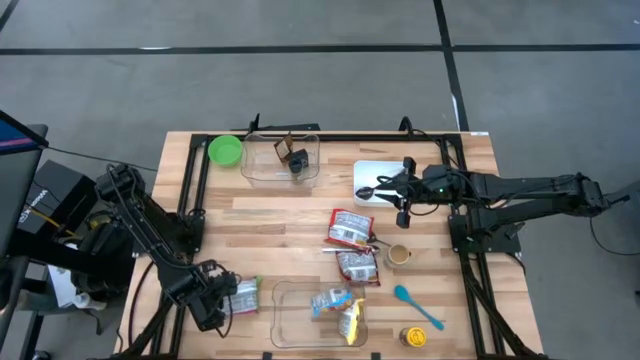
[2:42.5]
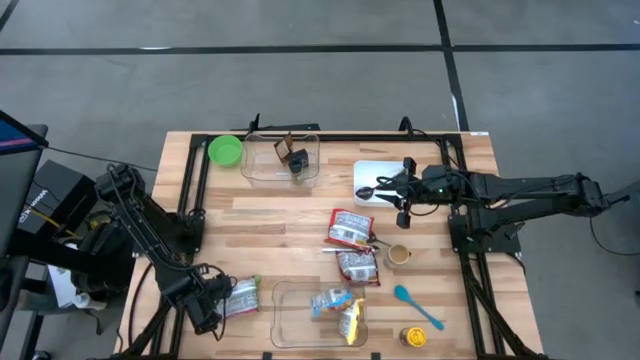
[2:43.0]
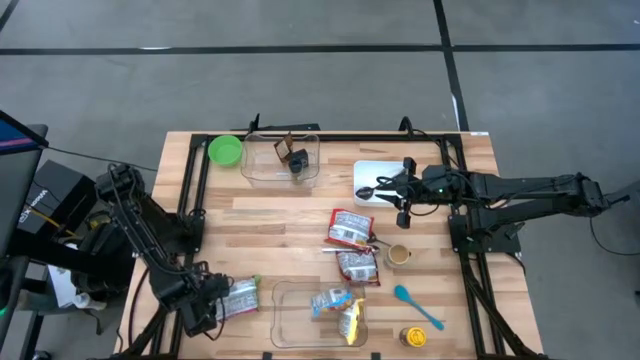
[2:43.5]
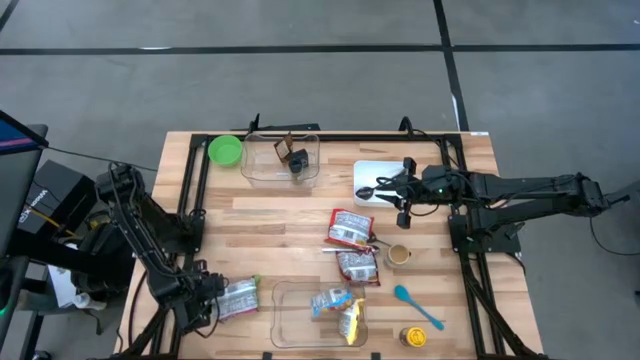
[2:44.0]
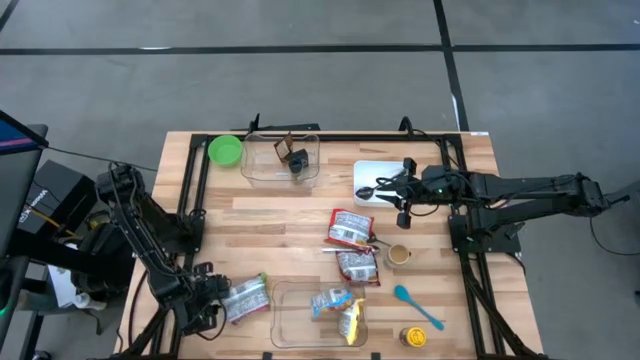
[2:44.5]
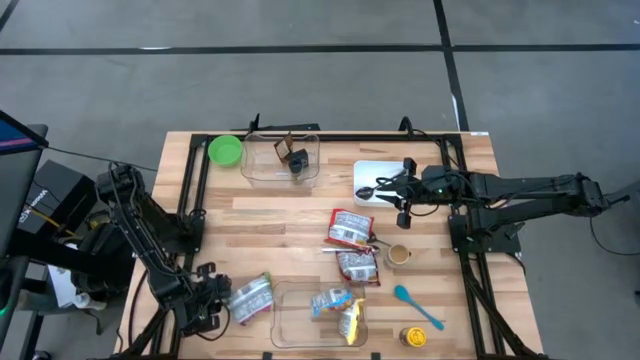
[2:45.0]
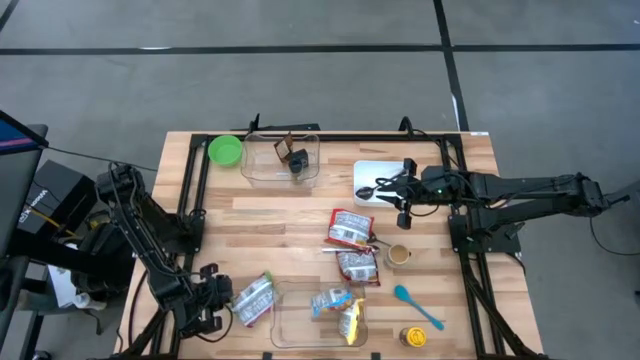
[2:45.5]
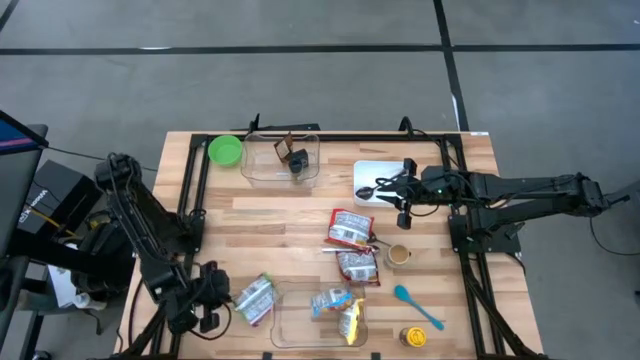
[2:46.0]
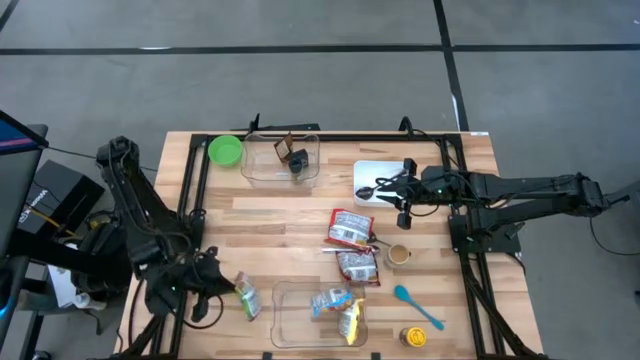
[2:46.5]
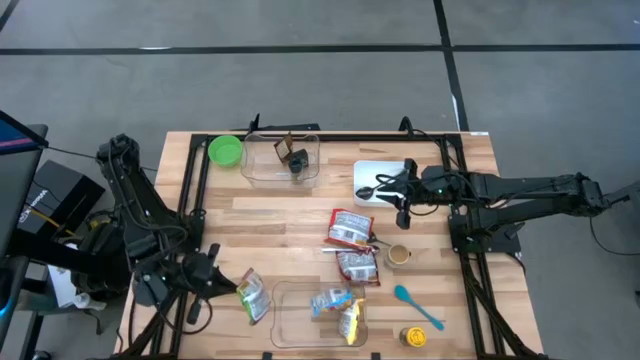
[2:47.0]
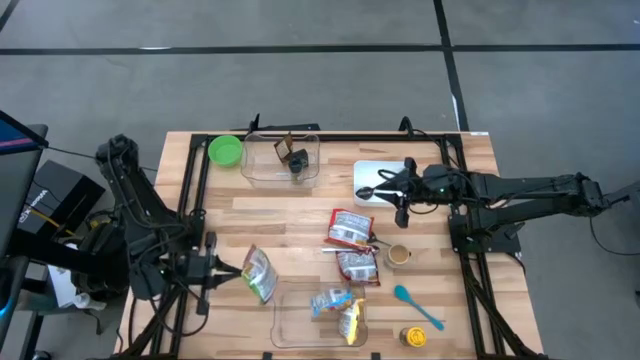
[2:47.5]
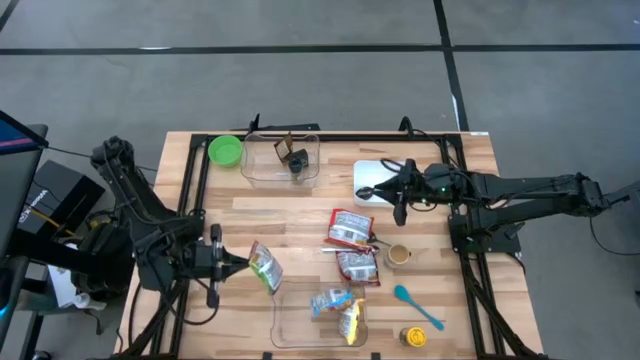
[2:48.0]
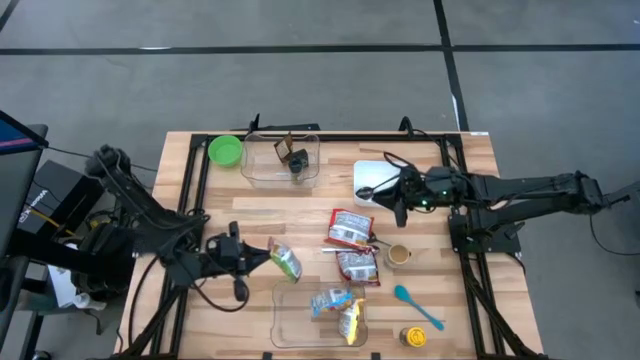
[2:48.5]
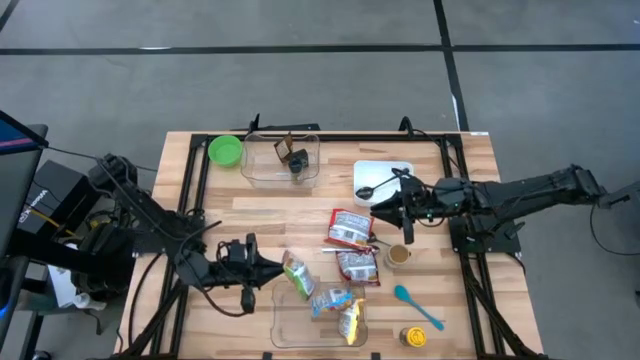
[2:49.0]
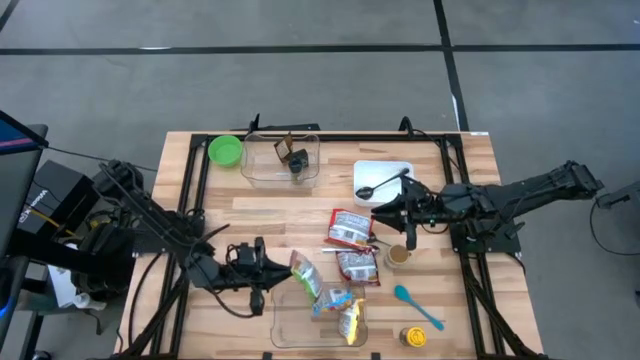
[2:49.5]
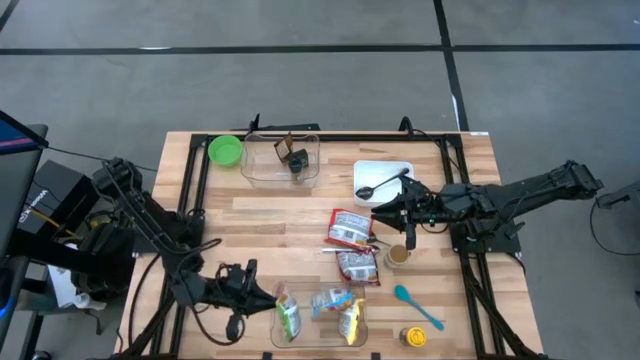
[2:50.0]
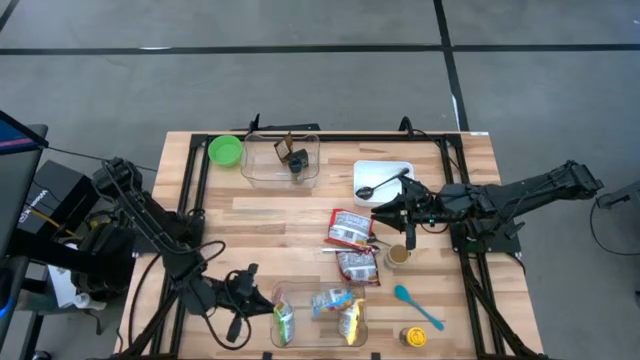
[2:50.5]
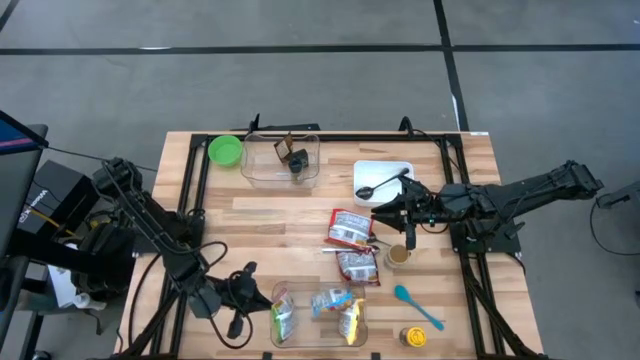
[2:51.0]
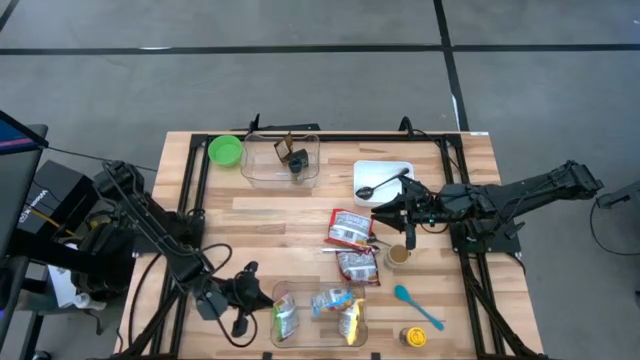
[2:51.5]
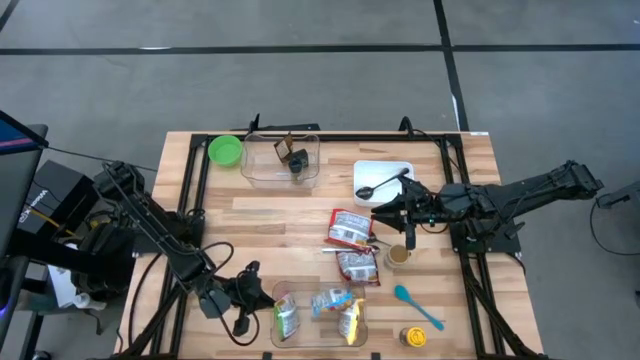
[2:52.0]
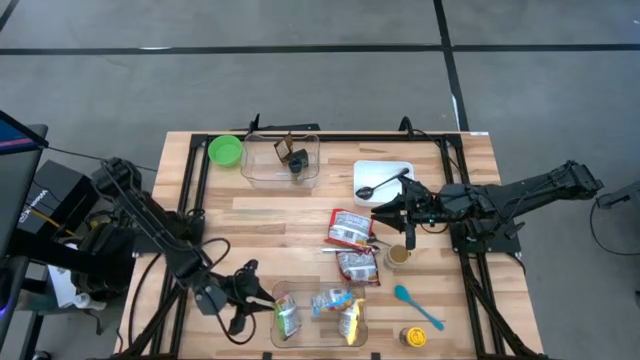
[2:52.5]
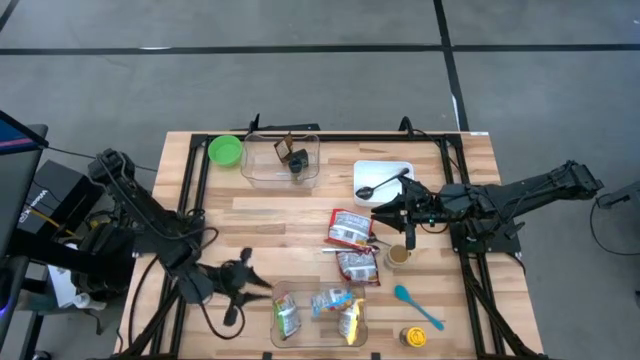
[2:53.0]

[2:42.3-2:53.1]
Task: Pick & Place Food Item
Put the green noodle pack into the bottom transparent bin

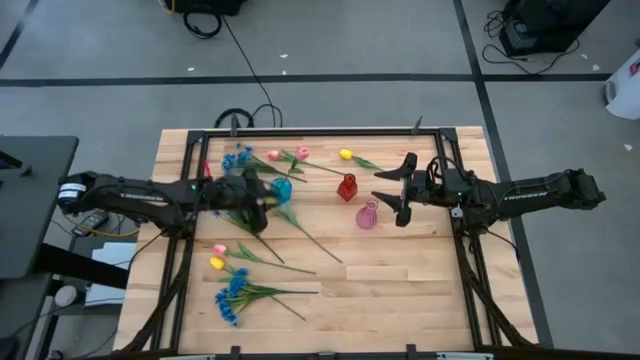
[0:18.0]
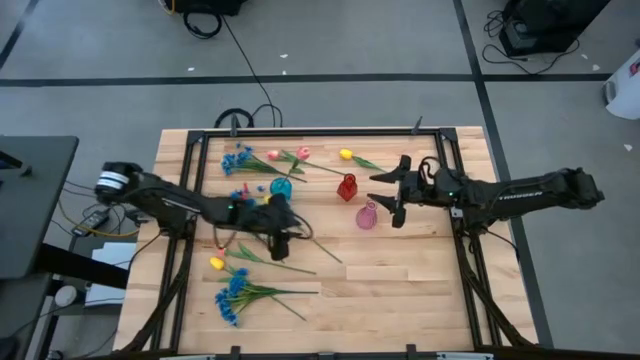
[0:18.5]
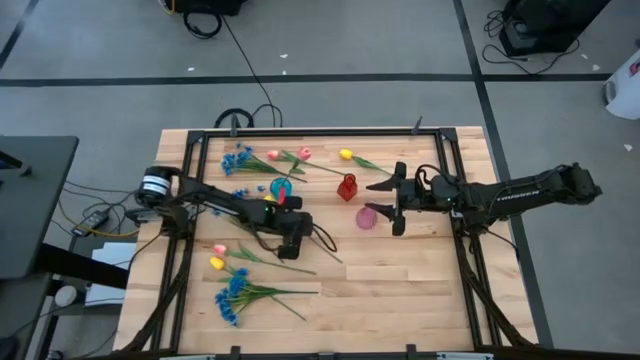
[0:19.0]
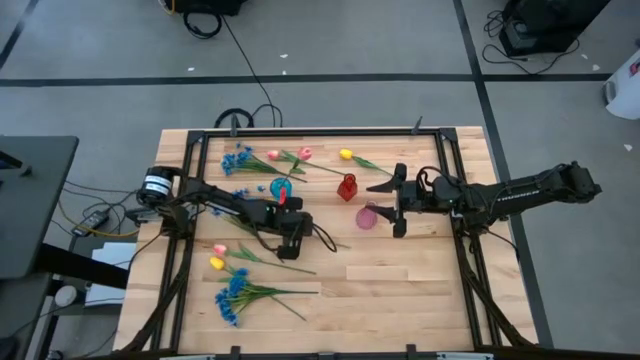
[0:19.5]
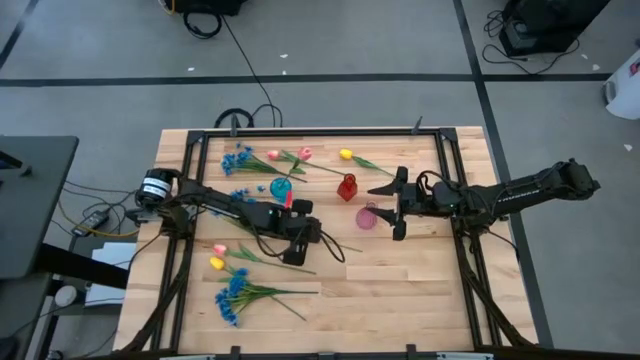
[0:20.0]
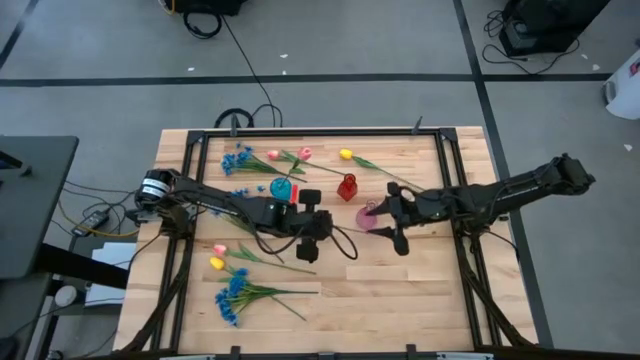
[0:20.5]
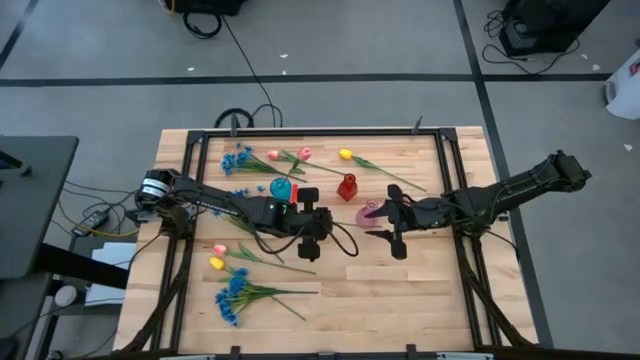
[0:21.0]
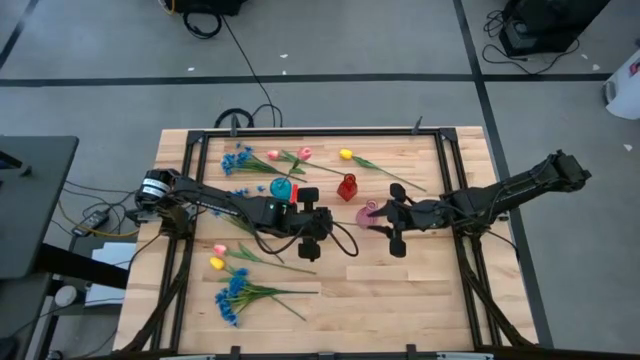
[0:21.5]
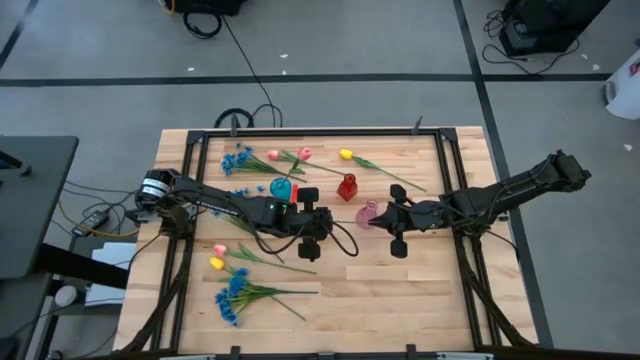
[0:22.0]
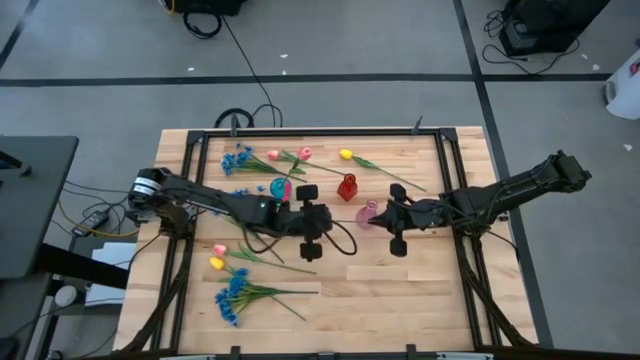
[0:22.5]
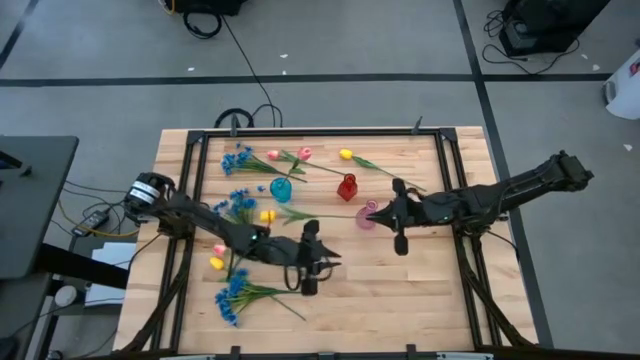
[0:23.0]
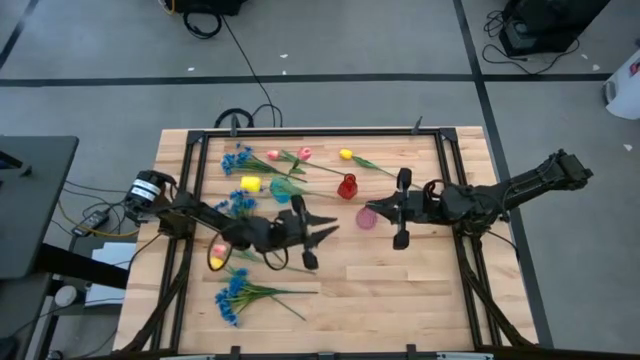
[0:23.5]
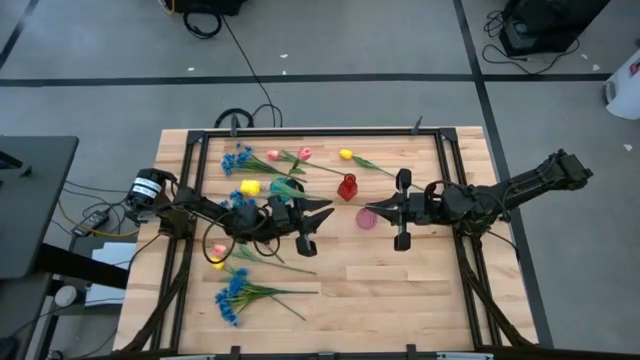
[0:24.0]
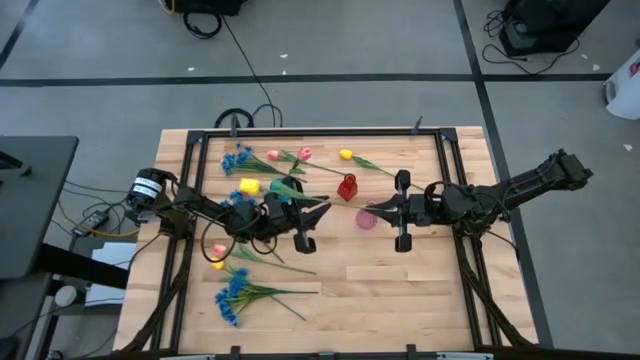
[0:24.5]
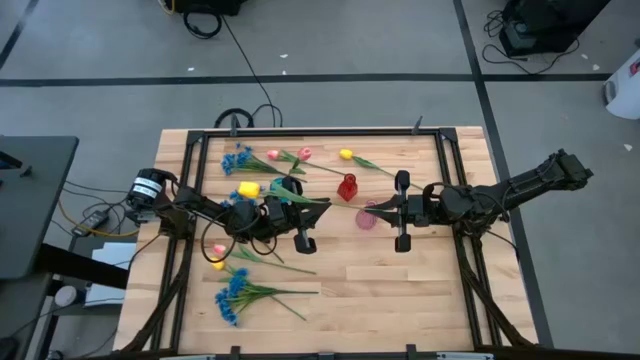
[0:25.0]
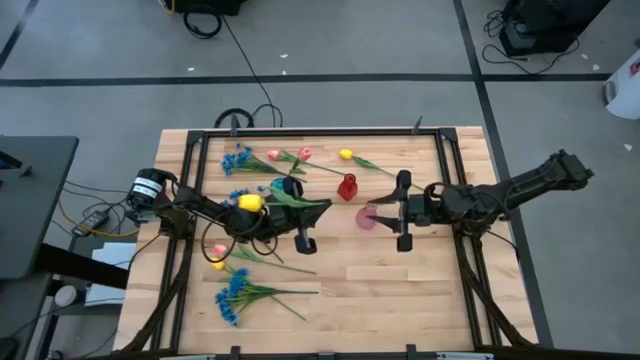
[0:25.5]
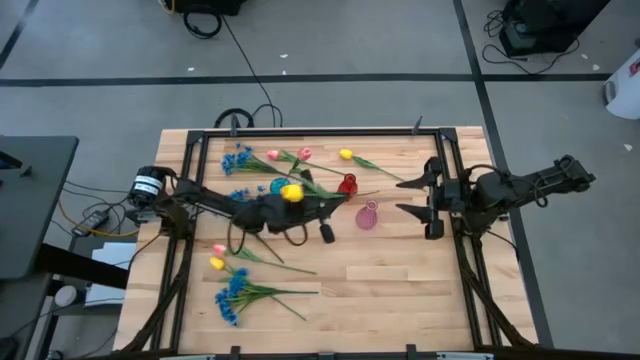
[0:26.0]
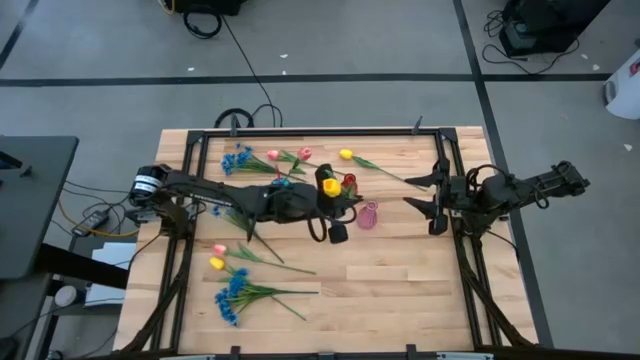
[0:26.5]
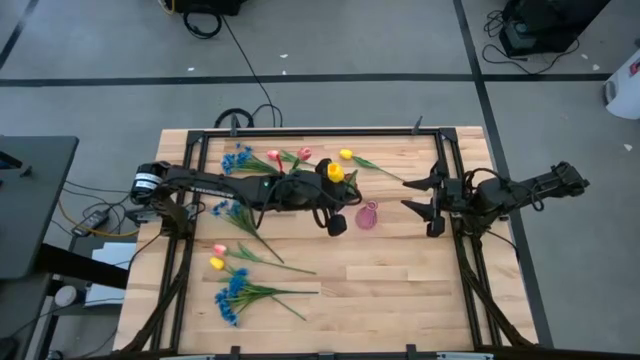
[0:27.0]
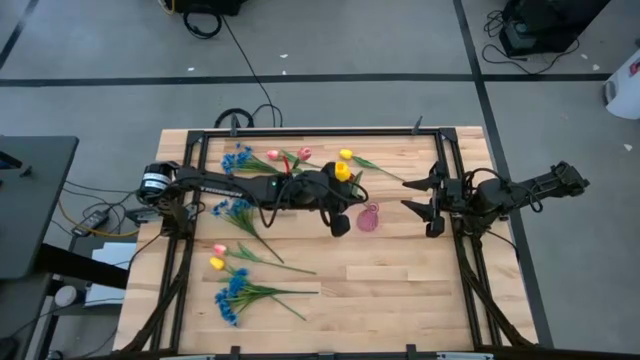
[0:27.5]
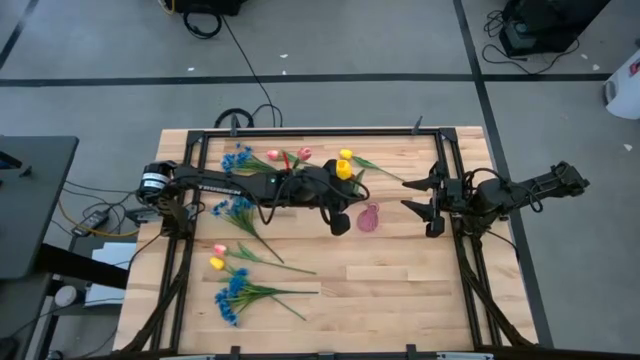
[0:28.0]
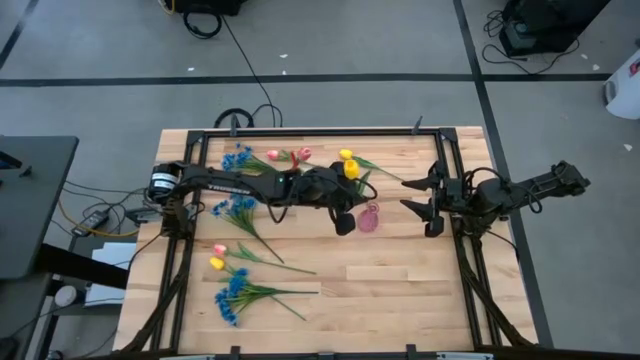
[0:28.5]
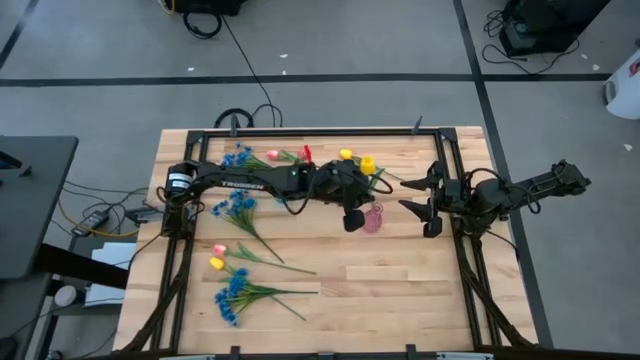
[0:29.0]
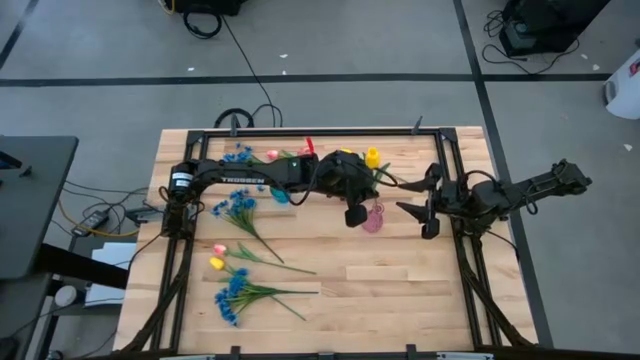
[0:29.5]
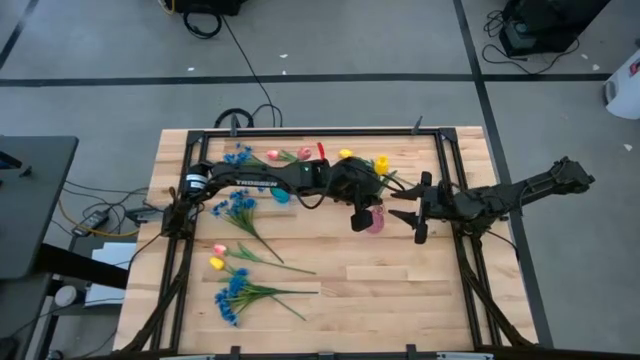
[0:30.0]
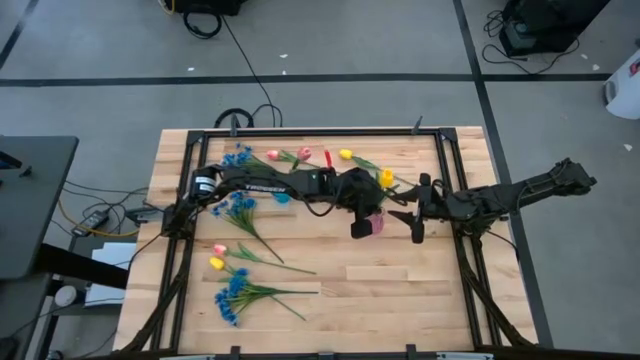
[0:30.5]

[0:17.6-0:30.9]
Task: Sort flowers into vase by color
Put the middle yellow flower into the pink vase
